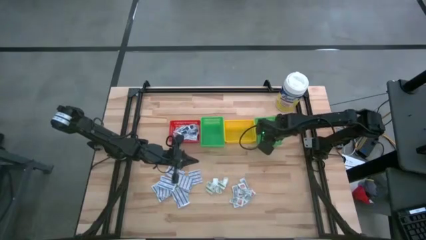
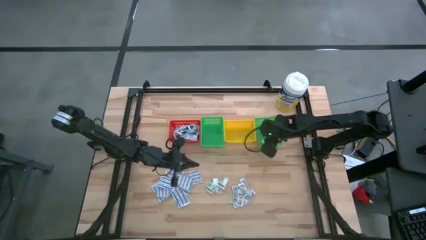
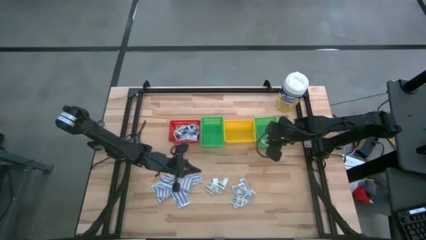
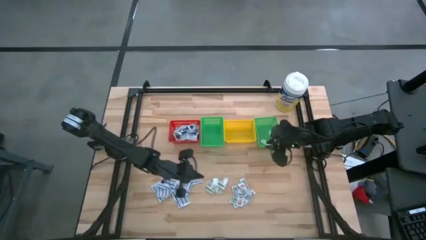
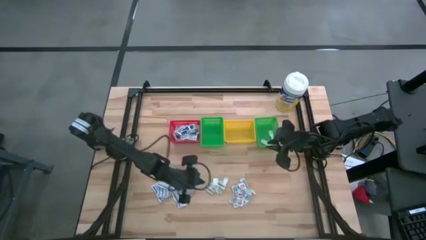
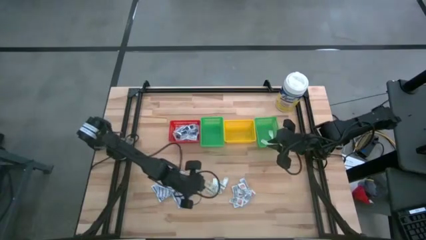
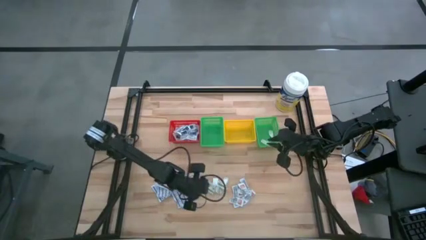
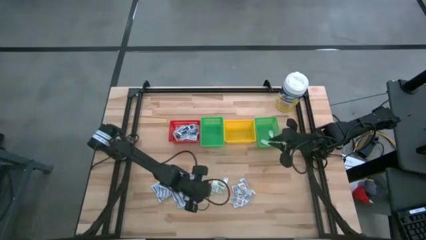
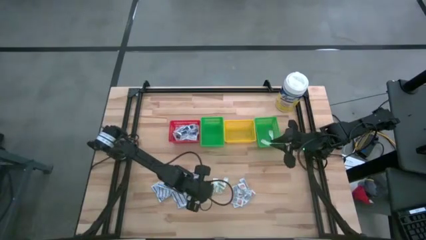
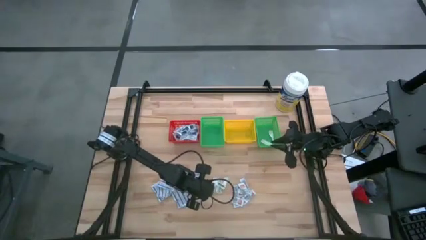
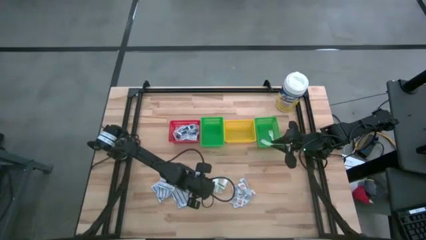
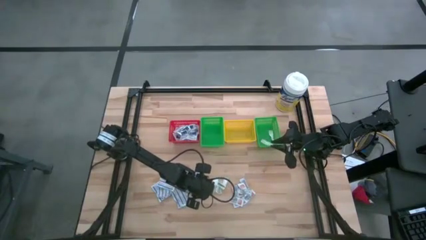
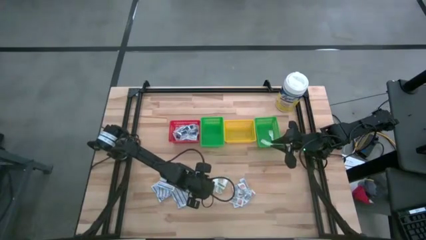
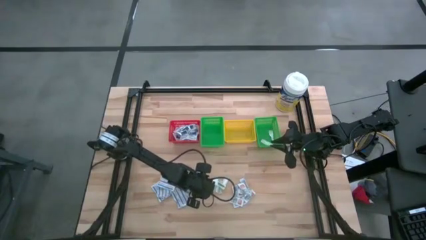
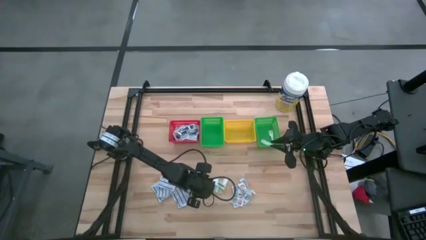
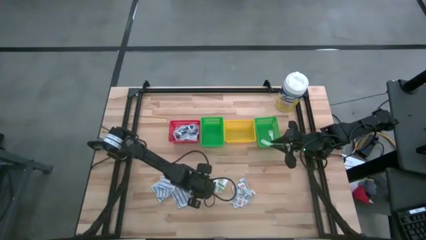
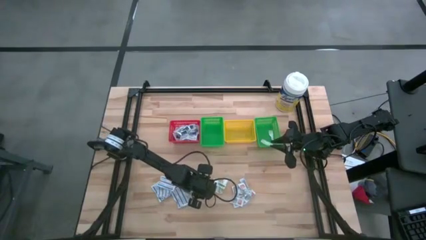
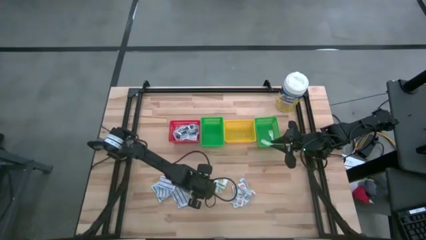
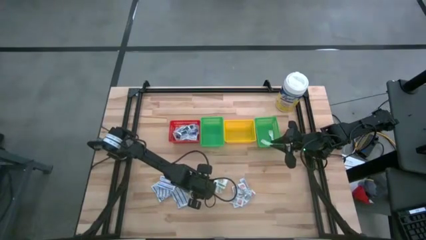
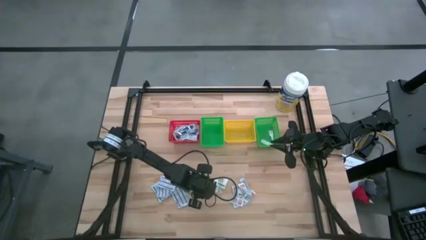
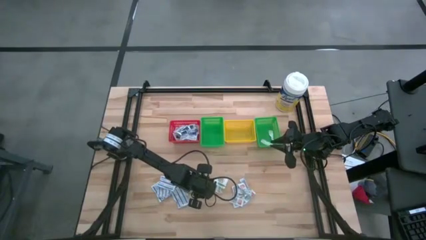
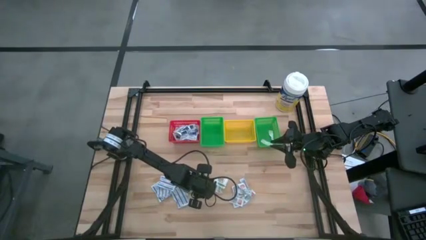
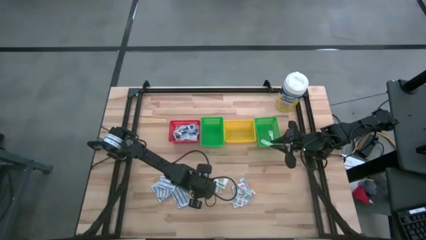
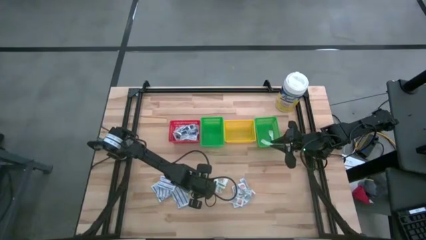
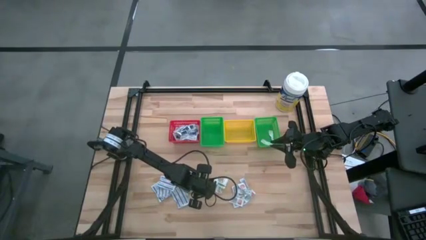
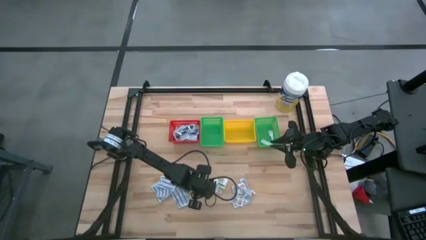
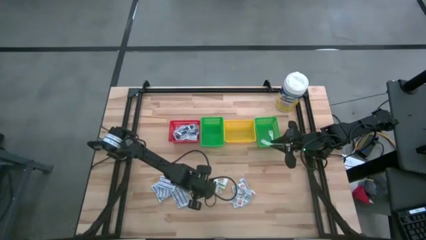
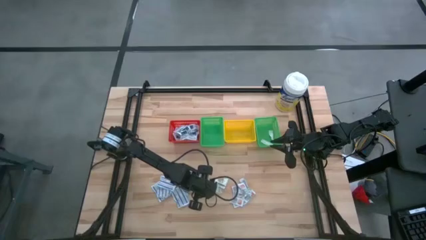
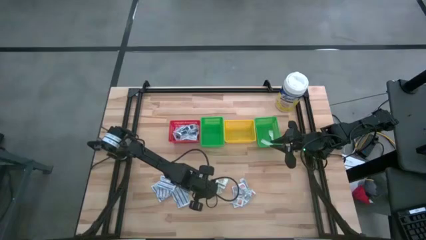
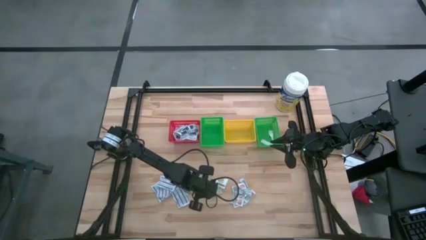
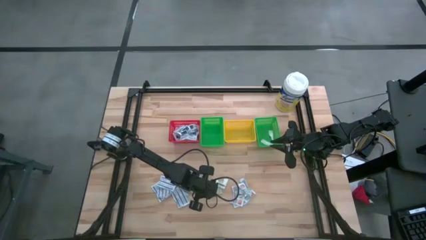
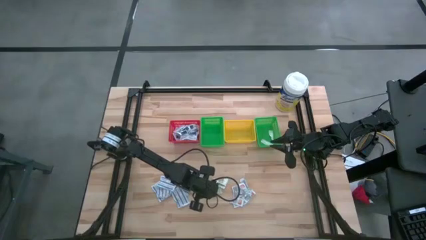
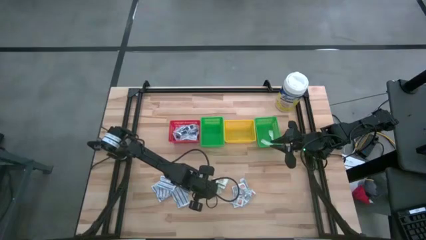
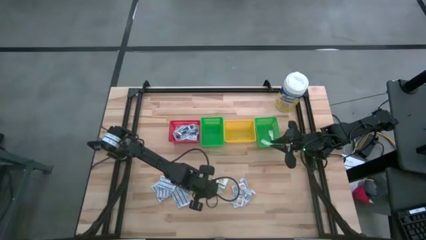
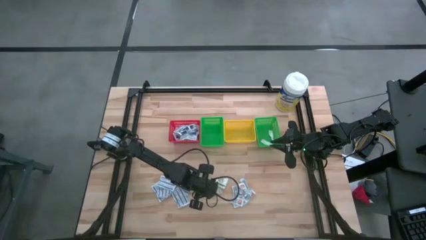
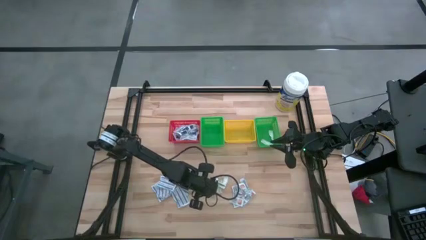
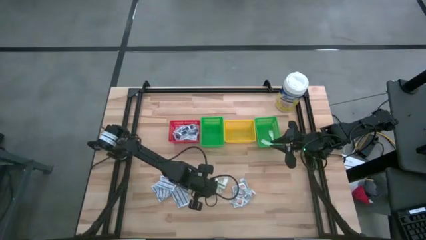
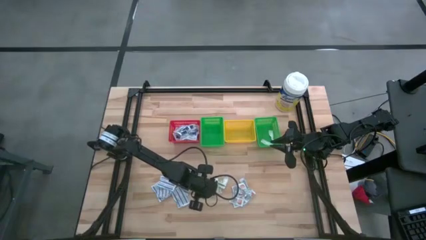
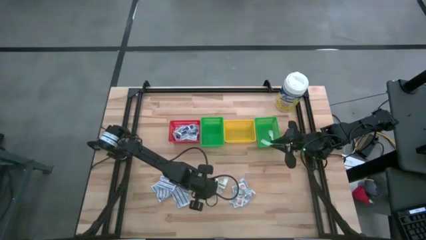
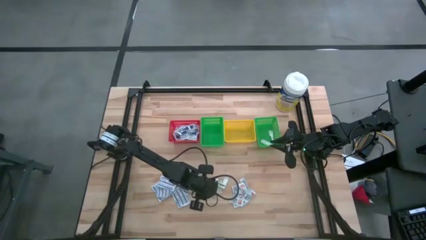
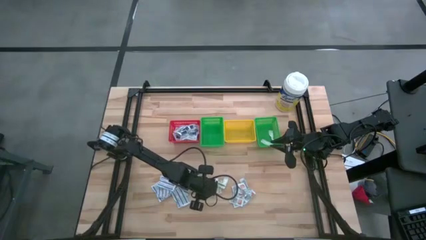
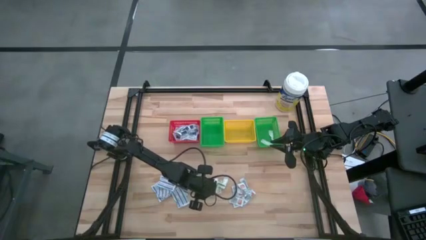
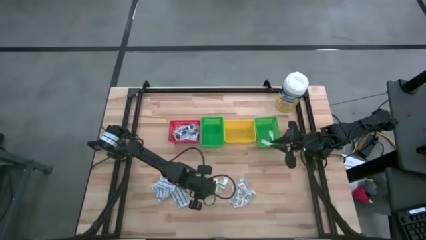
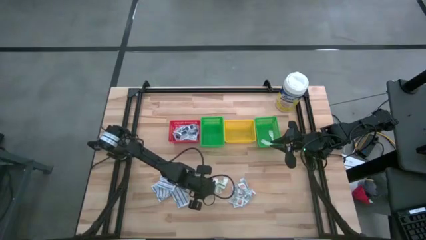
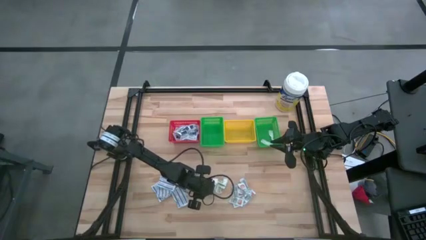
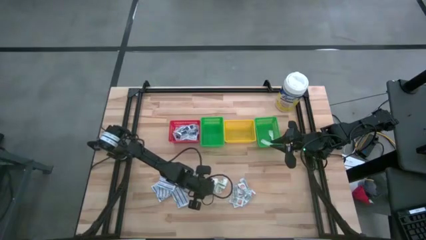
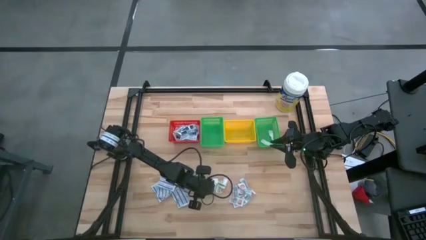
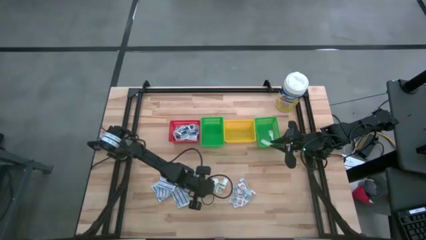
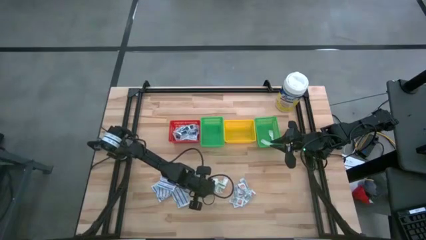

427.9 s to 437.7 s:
Task: Pick & Place First Aid Supplies
Put the green bandage into the right green basket

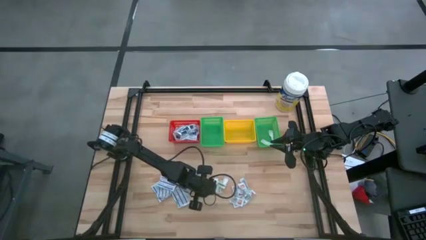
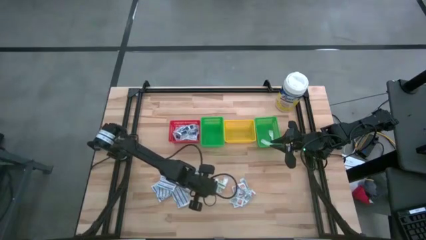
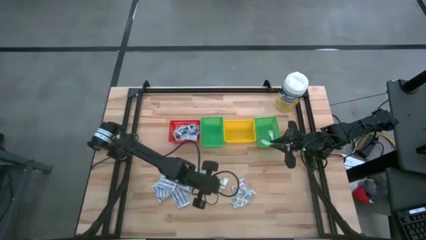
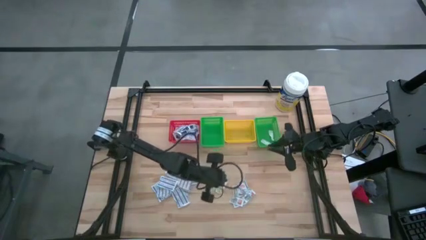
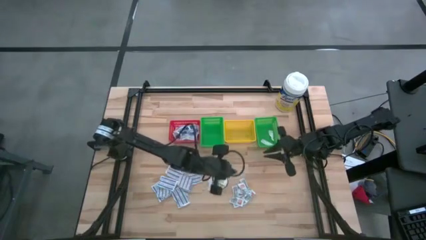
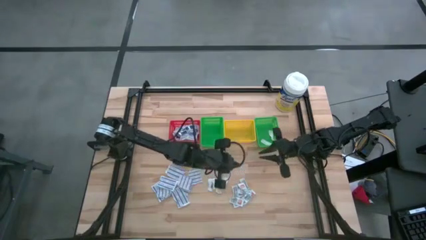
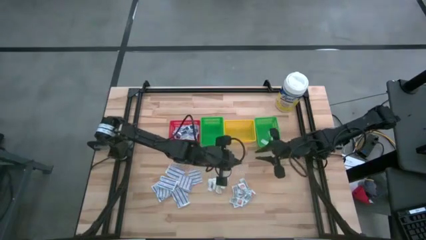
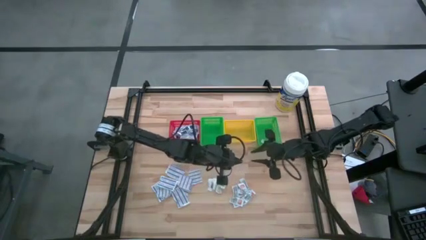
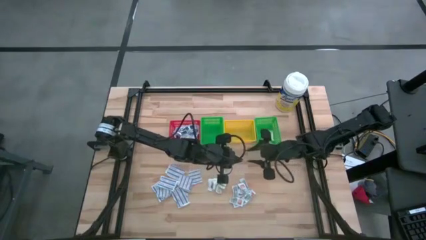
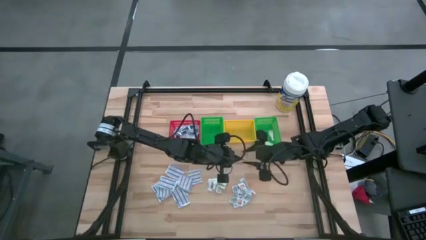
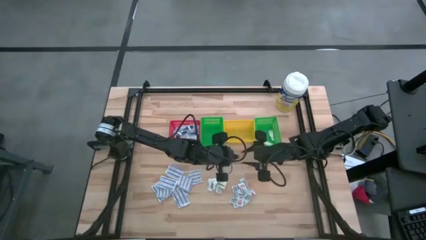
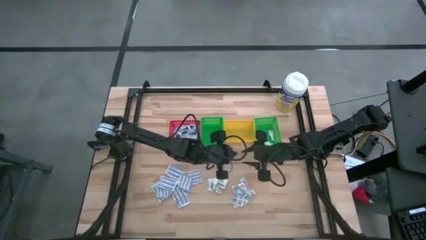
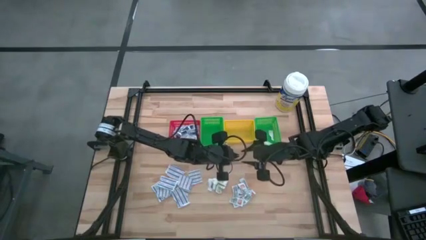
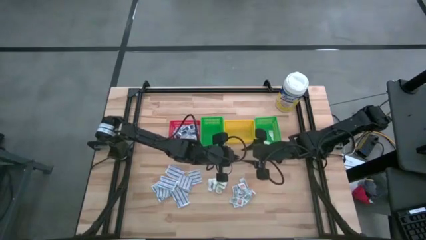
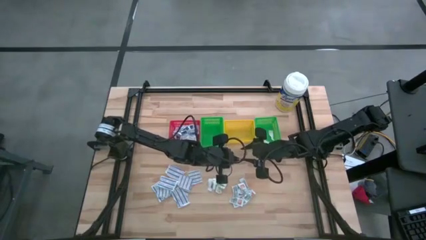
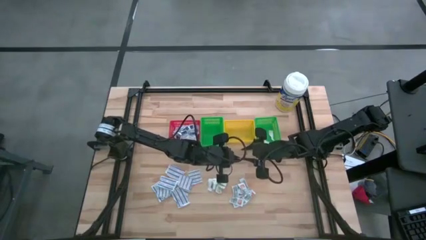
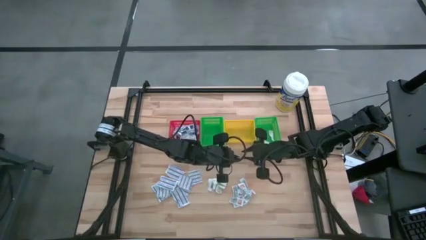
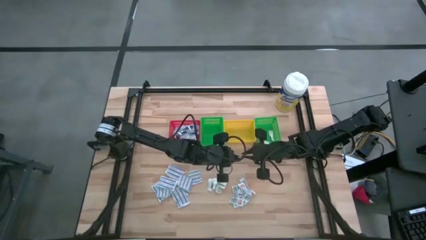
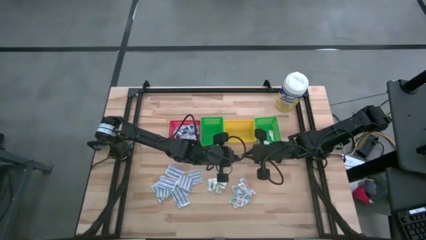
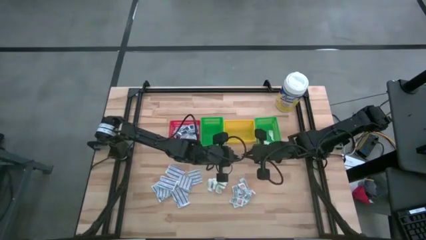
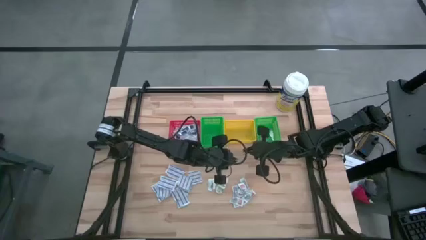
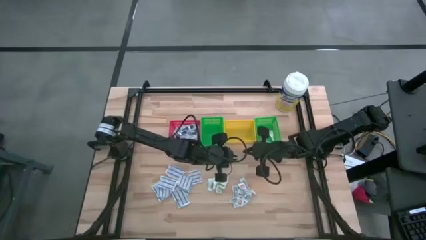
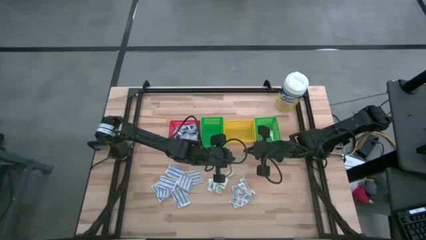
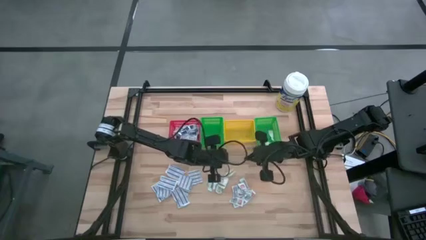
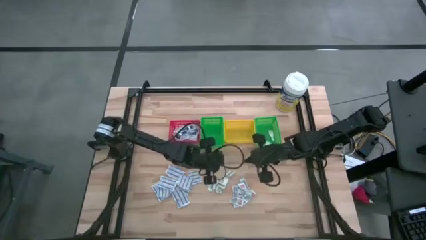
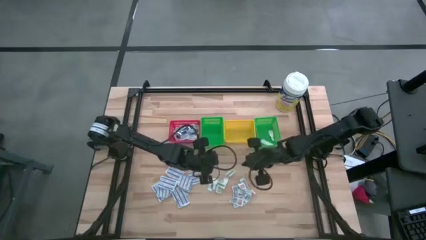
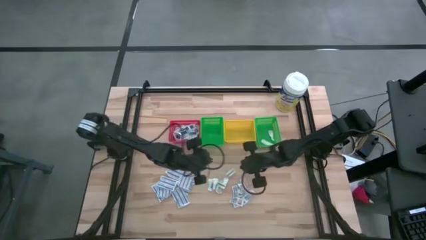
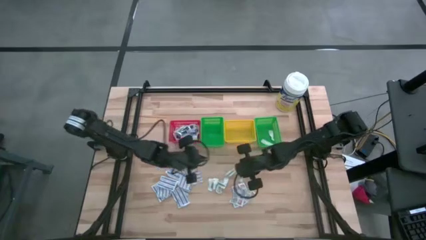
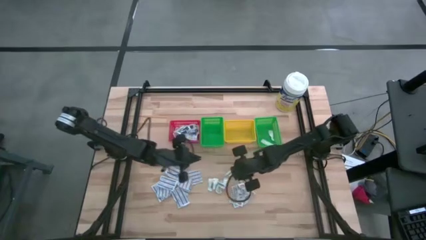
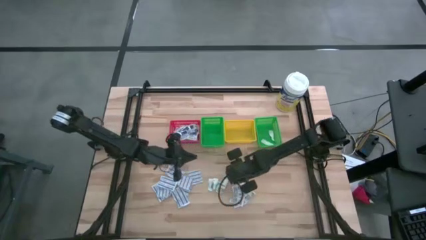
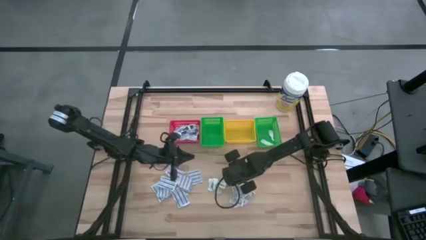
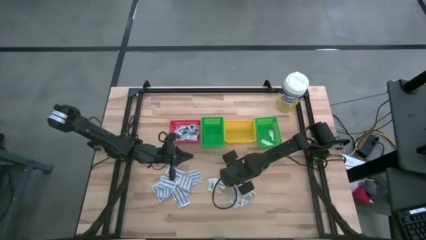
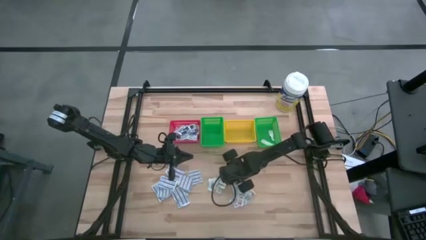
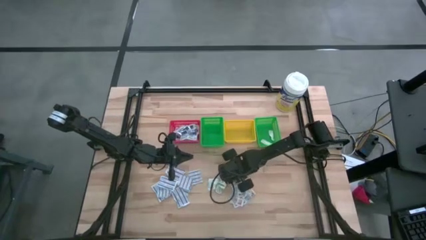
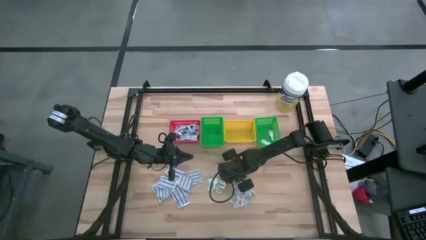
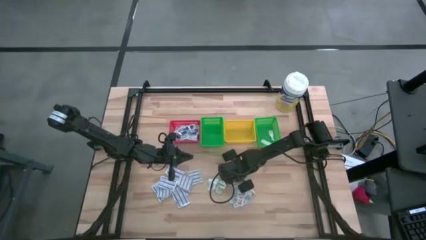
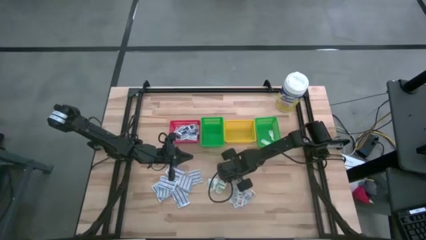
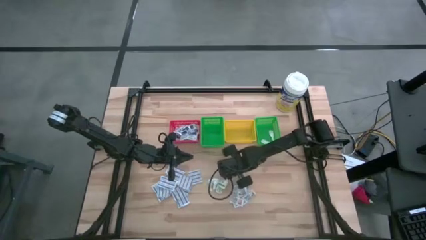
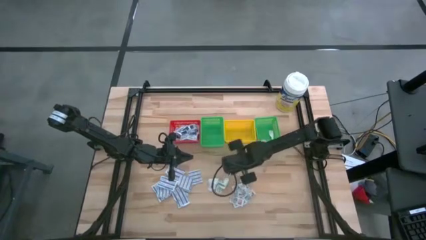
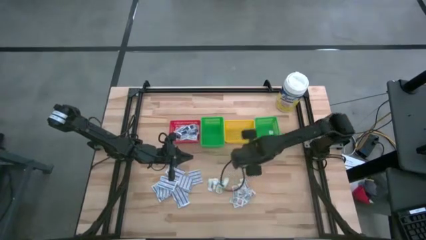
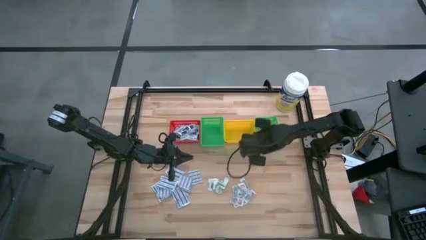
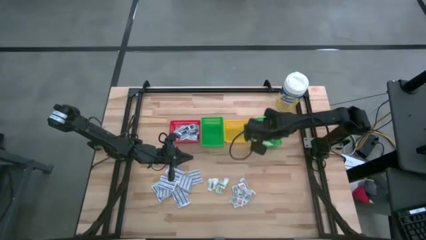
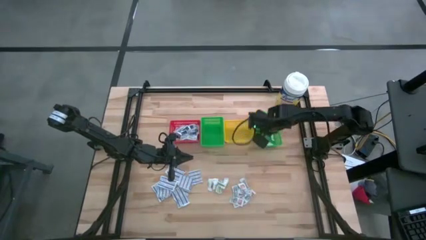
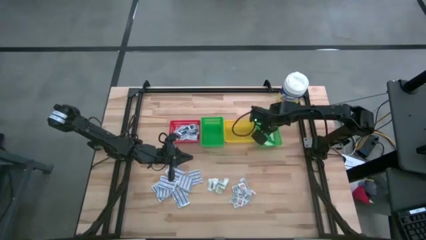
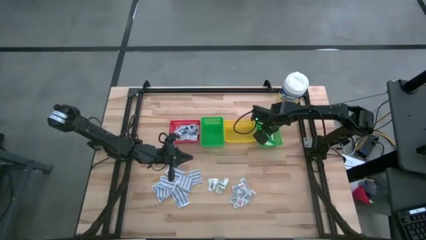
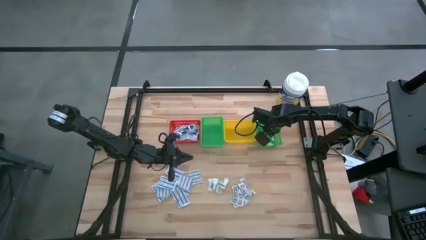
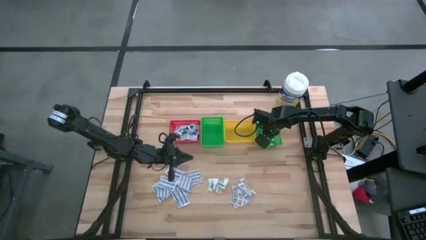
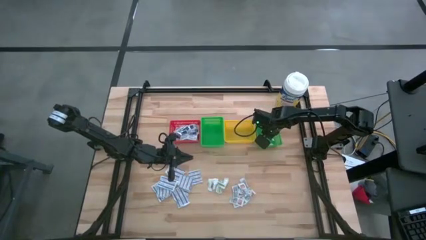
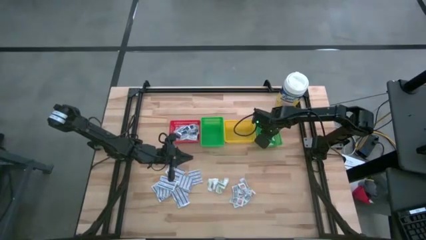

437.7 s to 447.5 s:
Put the green bandage into the right green basket
